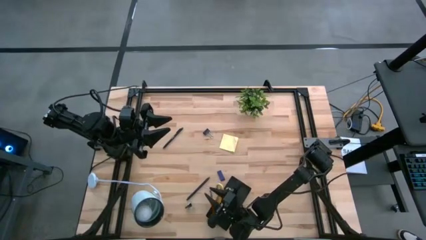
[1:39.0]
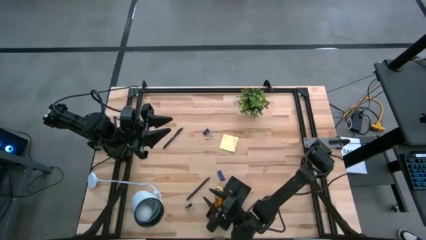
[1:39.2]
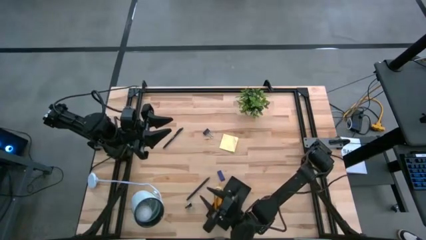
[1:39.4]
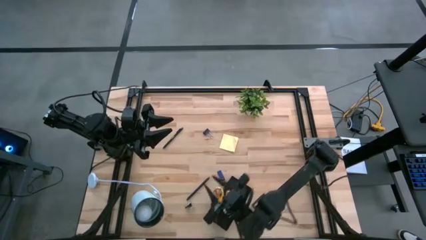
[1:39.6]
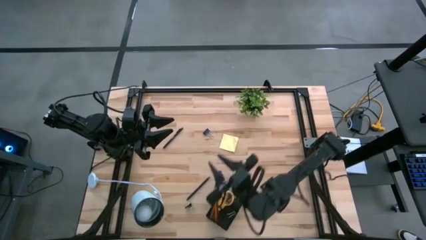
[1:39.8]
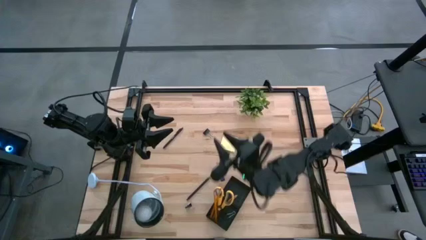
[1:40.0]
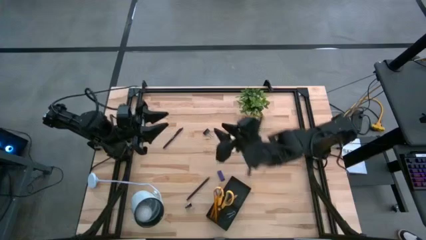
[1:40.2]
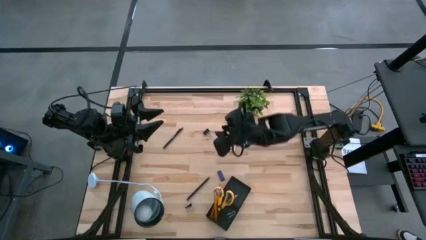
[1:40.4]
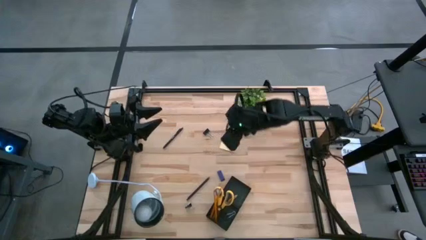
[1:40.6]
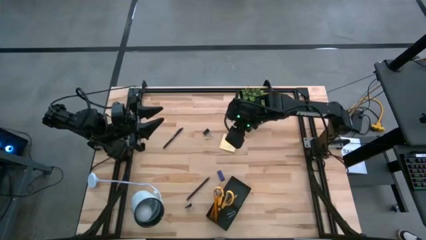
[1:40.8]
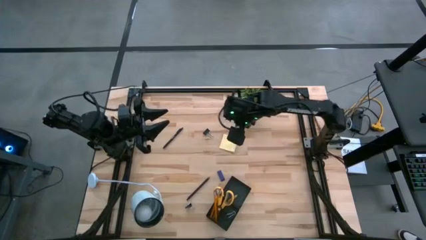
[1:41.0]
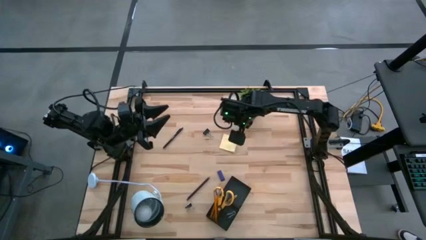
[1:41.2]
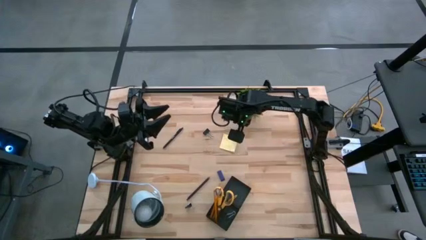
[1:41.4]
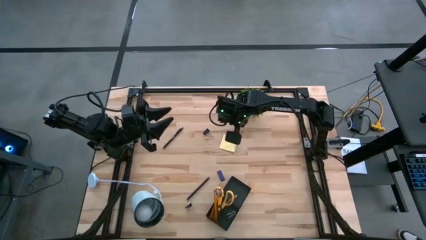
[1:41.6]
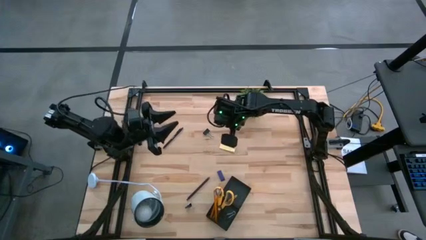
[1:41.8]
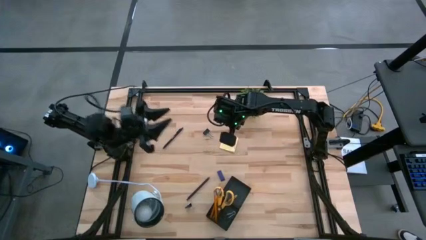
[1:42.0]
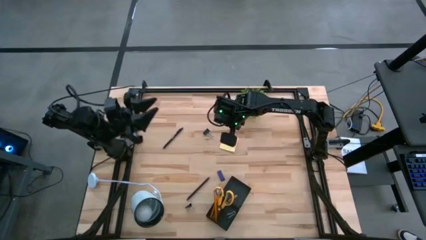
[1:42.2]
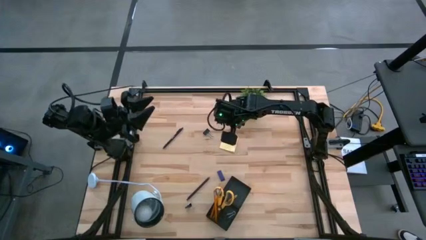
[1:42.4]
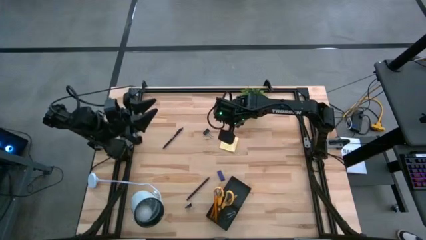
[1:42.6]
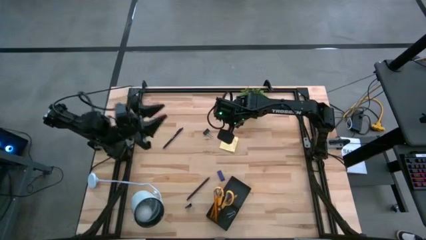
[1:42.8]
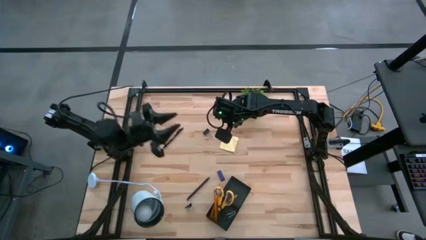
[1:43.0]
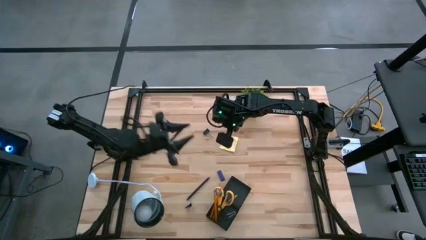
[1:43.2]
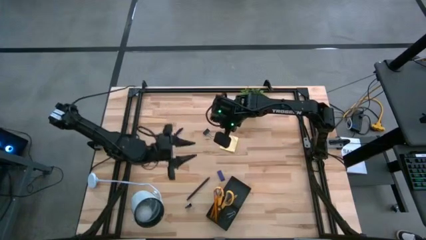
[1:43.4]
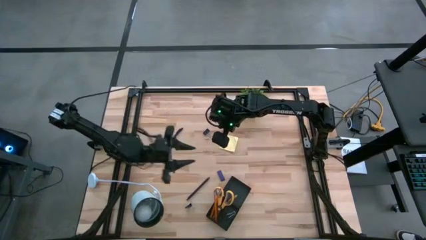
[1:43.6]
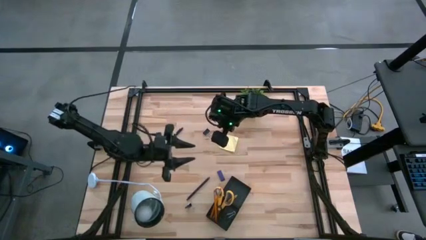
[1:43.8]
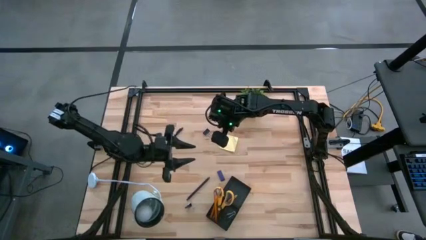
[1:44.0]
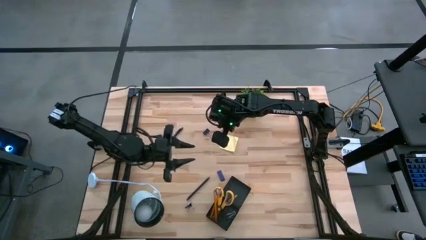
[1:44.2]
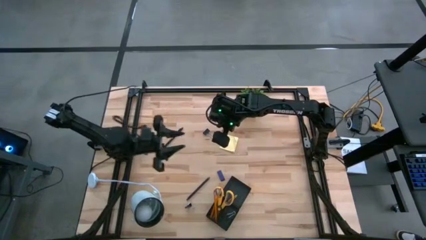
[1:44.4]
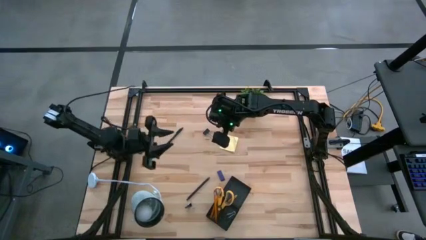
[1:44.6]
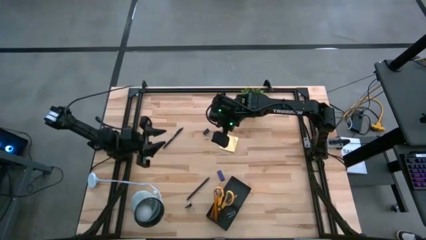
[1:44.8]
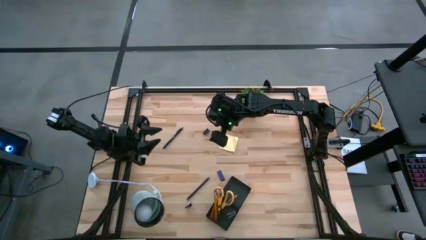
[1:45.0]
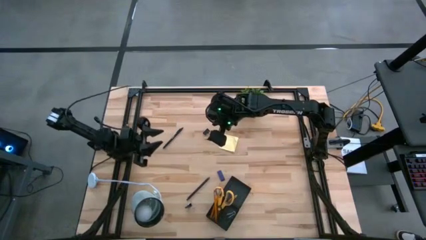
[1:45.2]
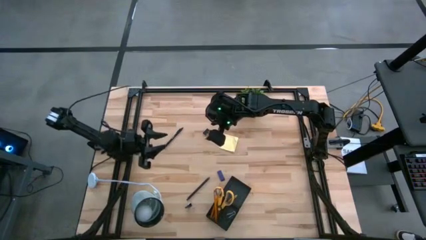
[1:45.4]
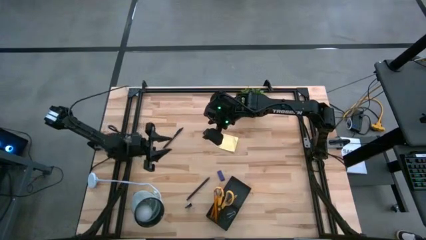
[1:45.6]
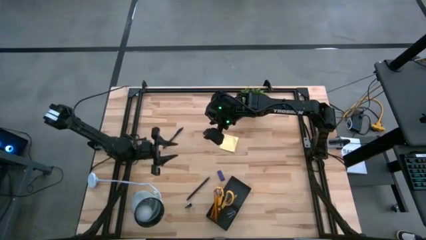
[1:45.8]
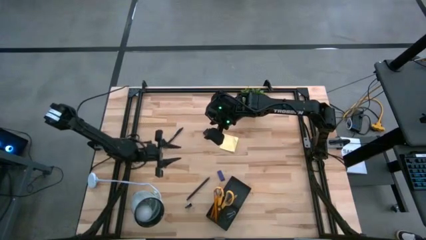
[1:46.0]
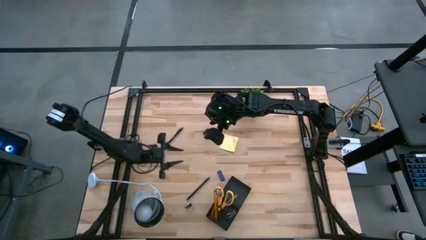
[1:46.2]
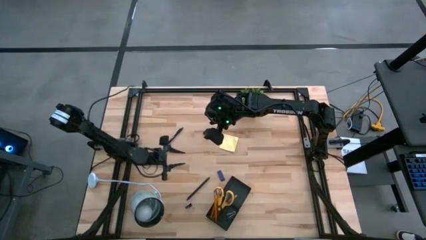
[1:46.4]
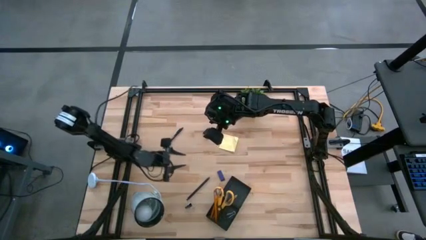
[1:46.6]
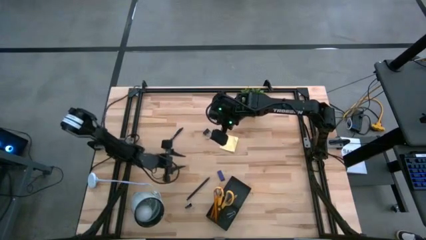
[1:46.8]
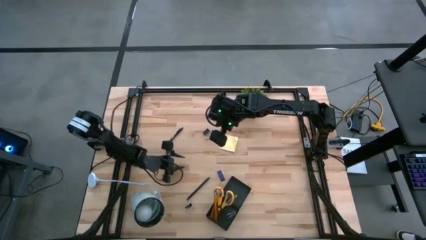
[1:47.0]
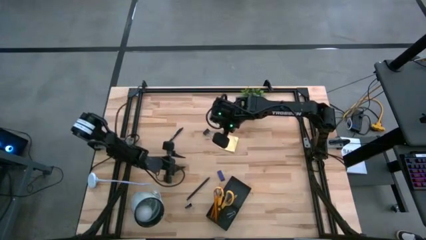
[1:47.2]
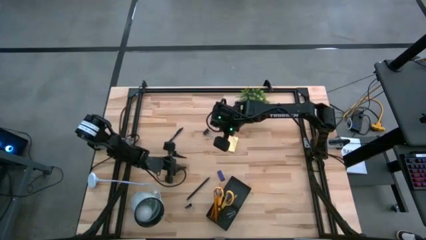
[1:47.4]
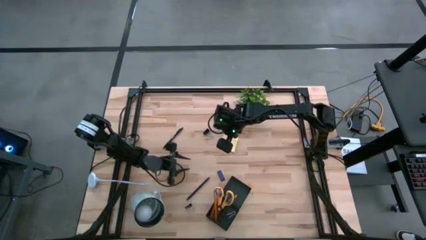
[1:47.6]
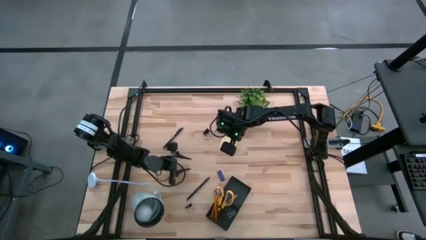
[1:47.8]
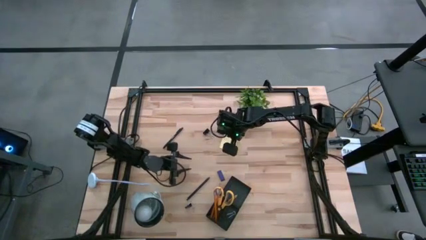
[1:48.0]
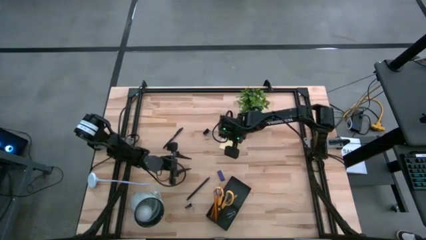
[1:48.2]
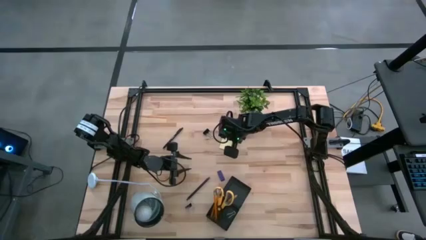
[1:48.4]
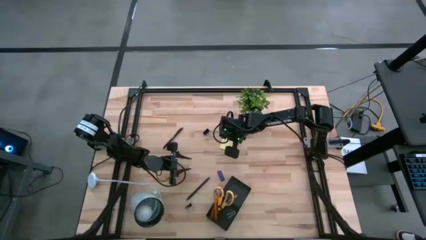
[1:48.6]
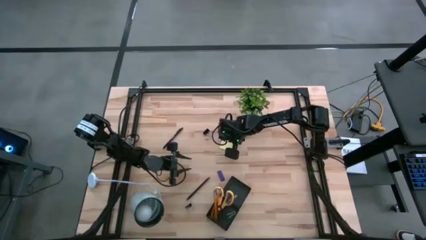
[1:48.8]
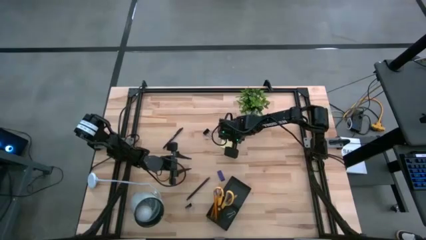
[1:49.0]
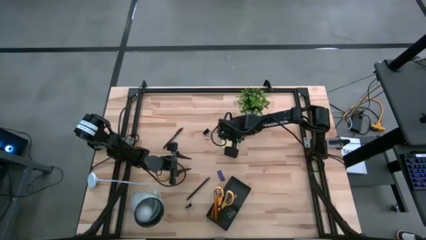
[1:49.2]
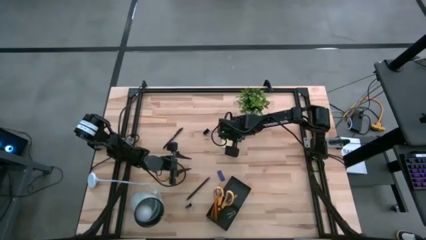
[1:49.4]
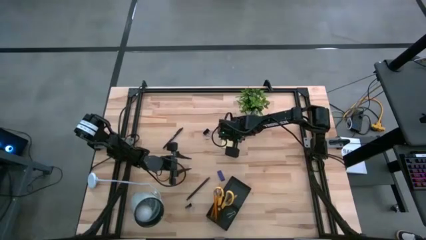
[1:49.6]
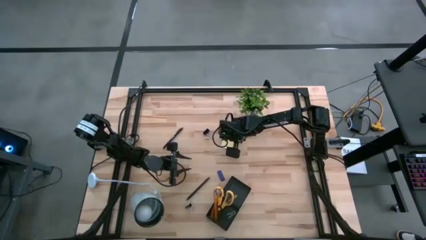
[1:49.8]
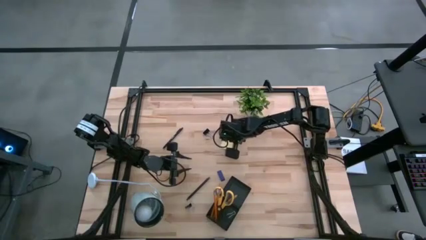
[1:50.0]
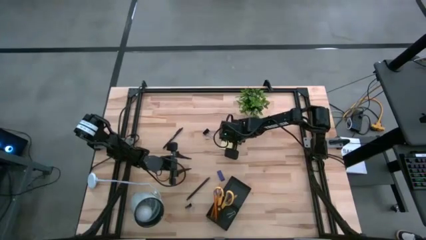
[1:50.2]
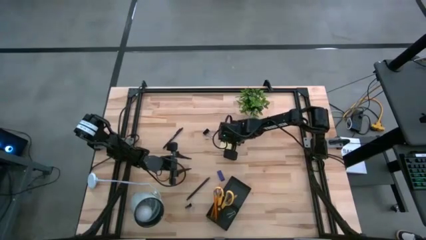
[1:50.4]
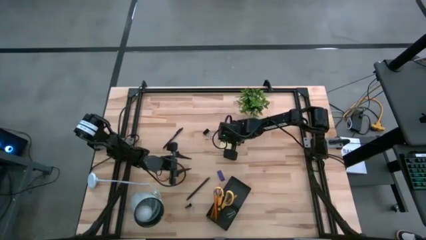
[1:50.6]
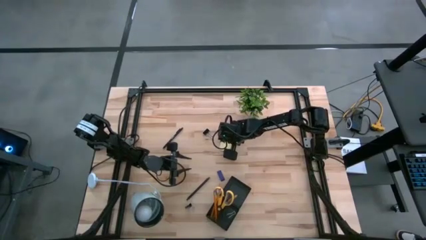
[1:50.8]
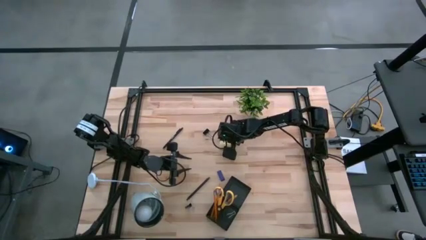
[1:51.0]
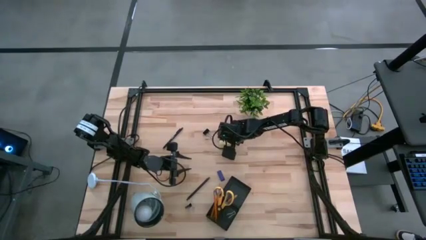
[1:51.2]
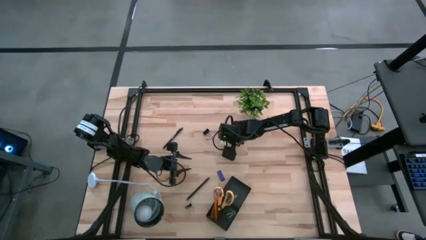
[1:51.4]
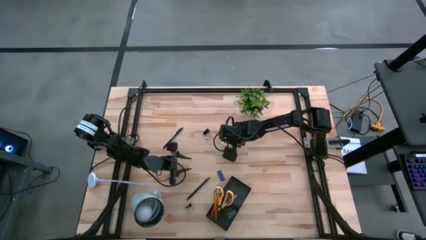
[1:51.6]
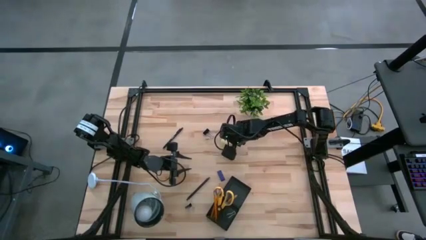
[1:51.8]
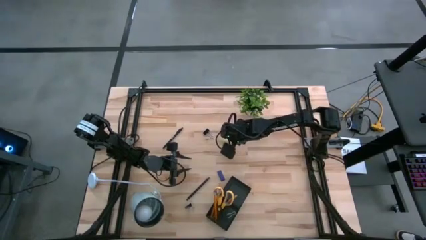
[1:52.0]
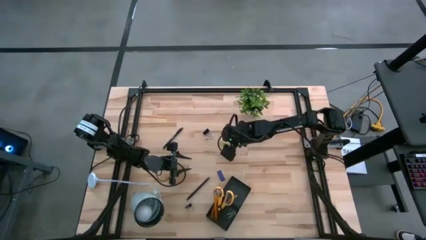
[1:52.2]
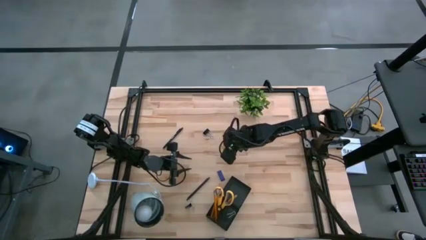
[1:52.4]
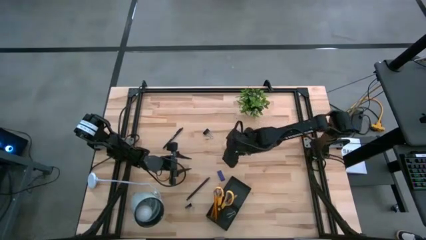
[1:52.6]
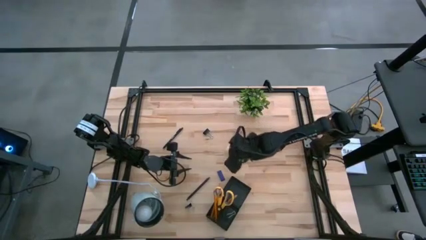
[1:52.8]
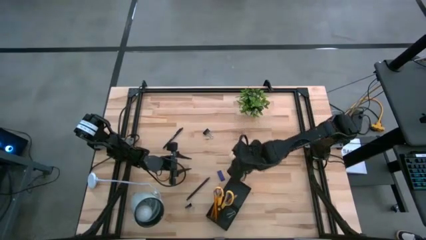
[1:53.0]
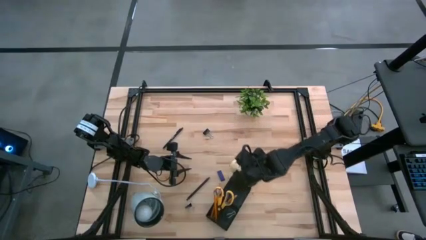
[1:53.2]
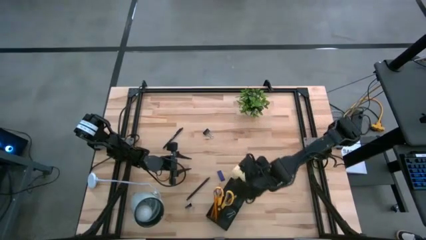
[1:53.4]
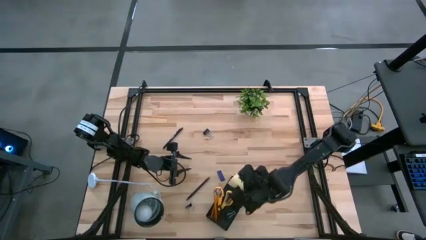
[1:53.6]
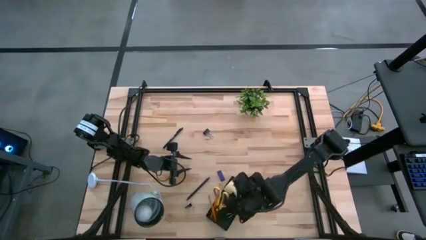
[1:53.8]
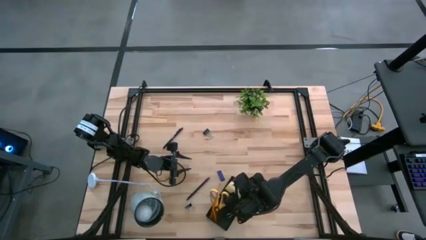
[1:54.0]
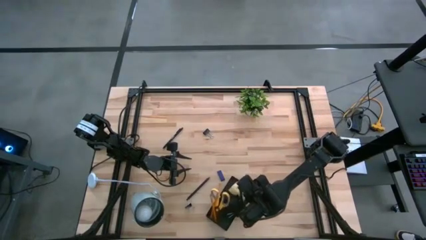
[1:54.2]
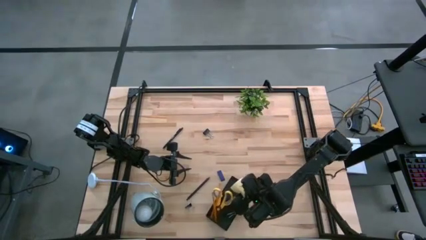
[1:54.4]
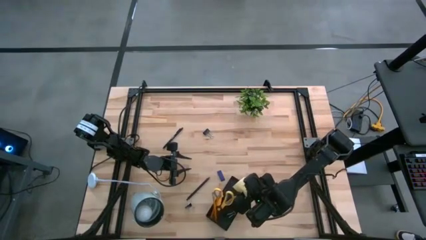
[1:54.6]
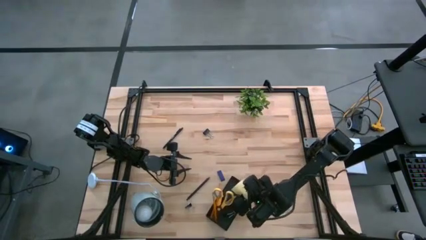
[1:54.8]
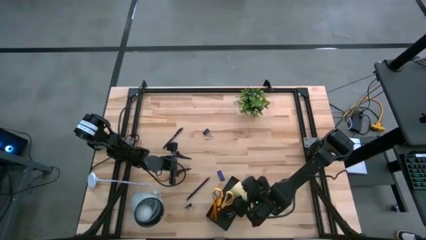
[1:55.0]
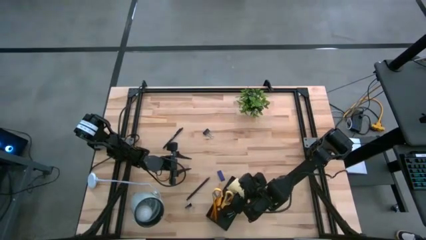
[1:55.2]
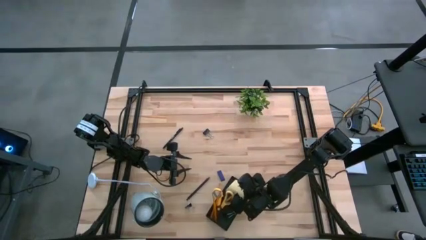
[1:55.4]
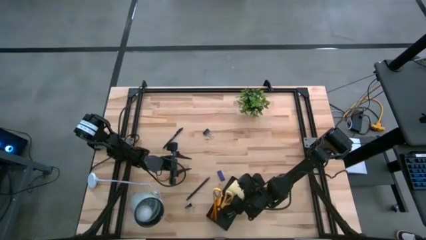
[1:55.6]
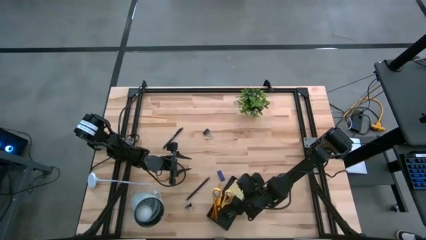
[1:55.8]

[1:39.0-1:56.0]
Task: Pick and place office supplies into organizer
Put the sticky note into the desk organizer
